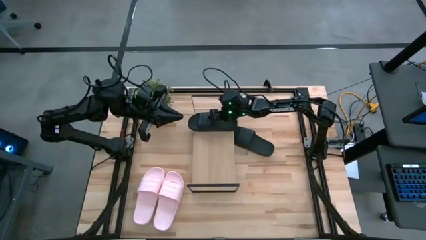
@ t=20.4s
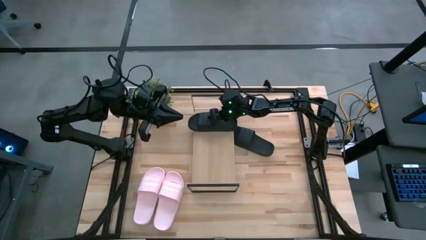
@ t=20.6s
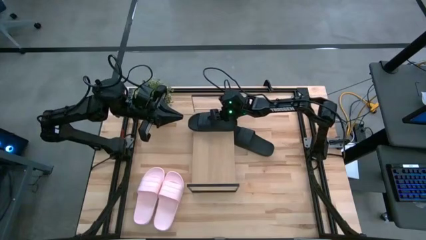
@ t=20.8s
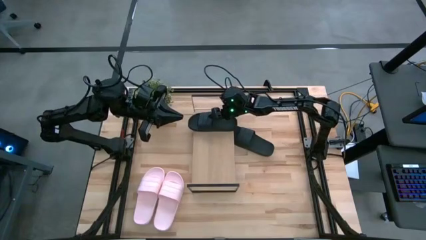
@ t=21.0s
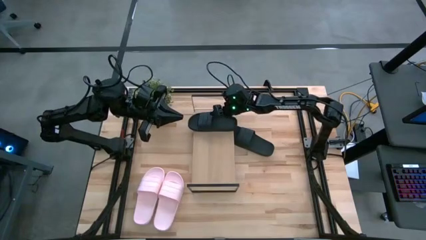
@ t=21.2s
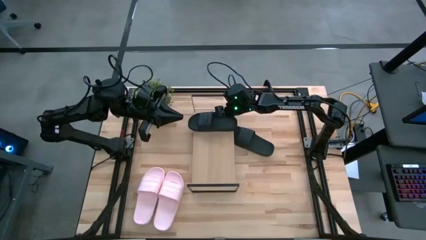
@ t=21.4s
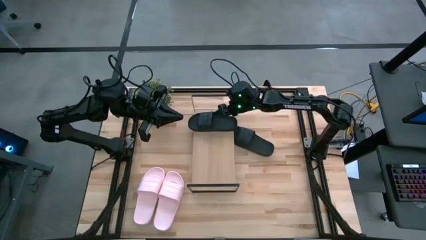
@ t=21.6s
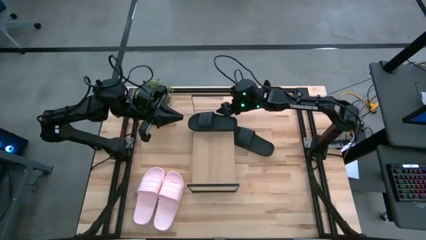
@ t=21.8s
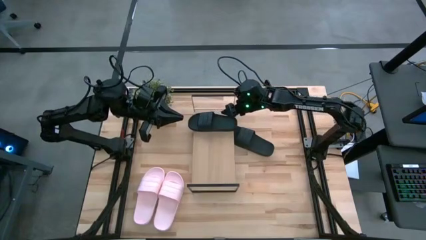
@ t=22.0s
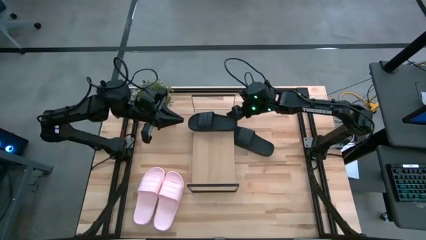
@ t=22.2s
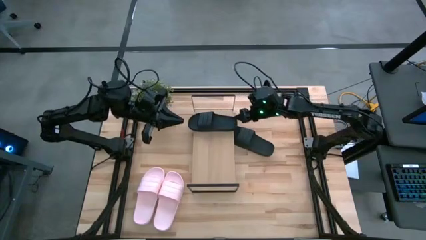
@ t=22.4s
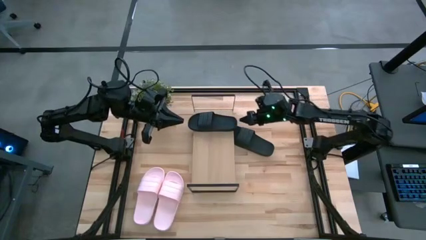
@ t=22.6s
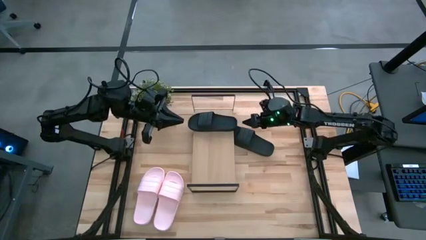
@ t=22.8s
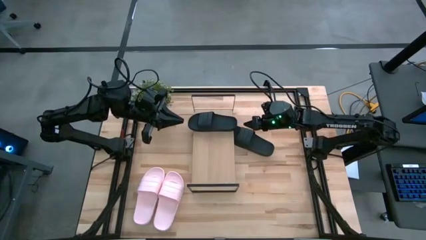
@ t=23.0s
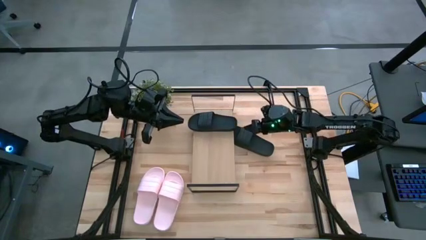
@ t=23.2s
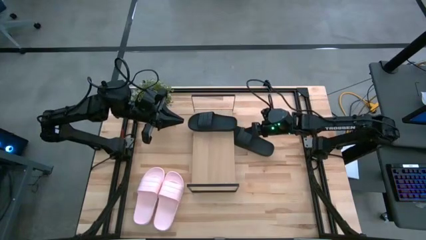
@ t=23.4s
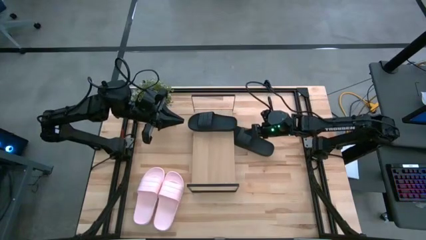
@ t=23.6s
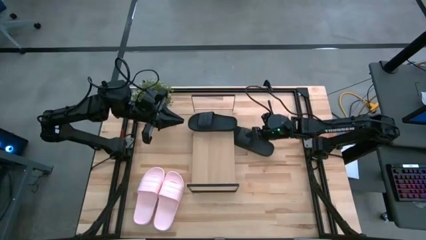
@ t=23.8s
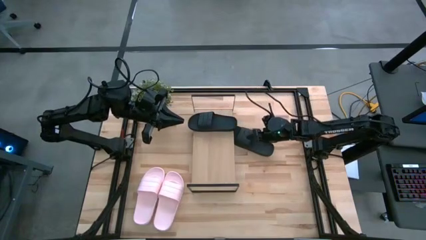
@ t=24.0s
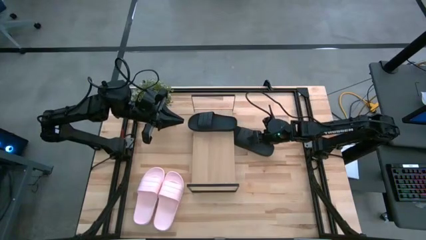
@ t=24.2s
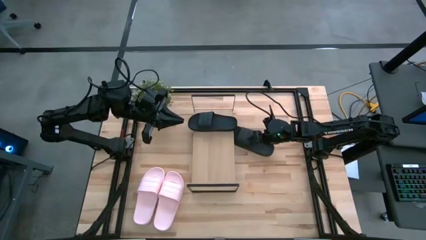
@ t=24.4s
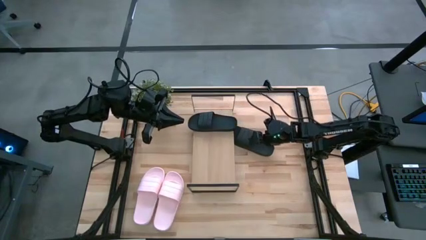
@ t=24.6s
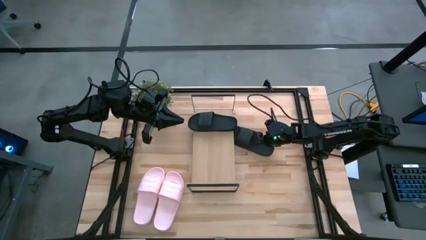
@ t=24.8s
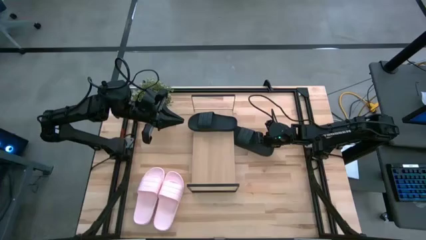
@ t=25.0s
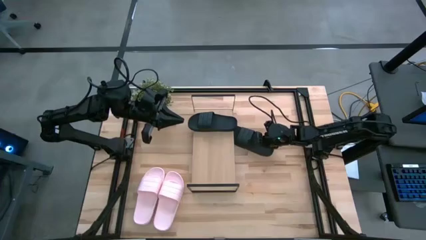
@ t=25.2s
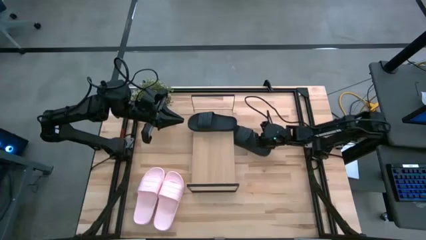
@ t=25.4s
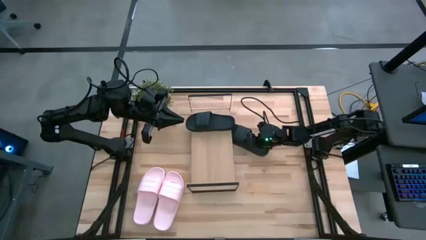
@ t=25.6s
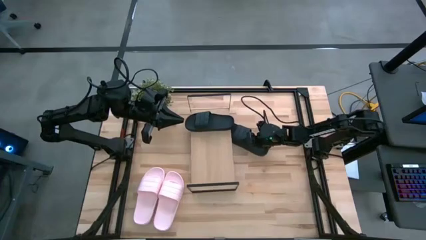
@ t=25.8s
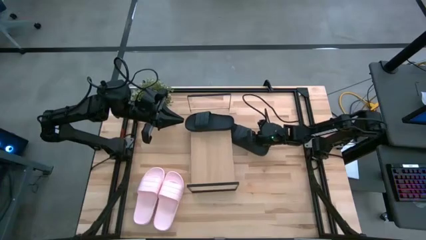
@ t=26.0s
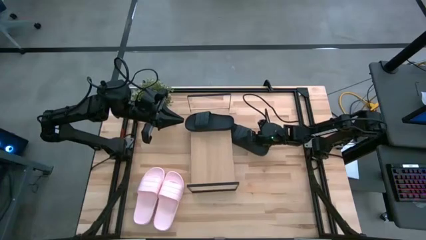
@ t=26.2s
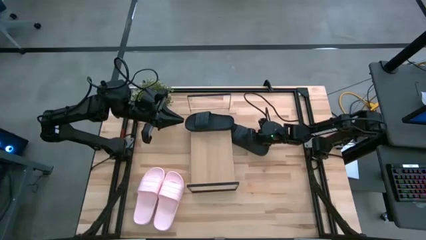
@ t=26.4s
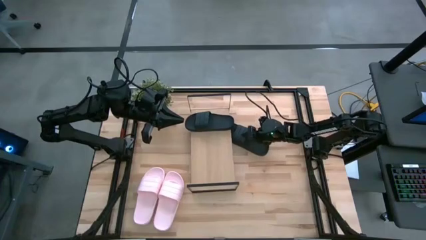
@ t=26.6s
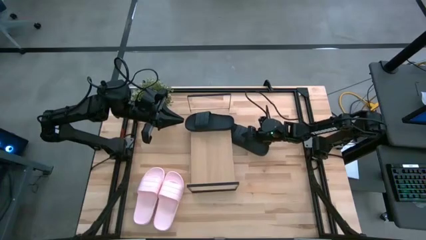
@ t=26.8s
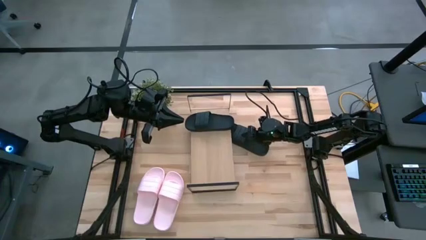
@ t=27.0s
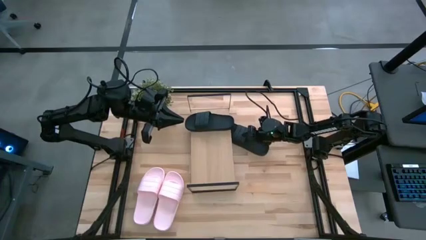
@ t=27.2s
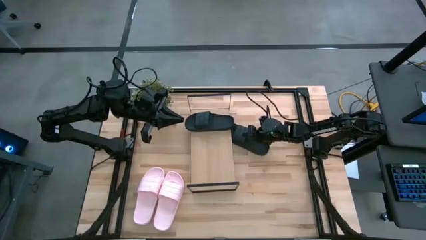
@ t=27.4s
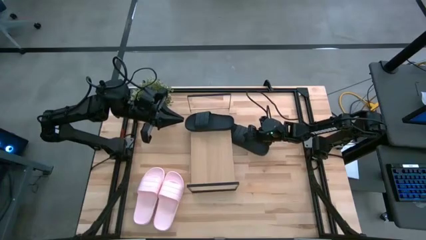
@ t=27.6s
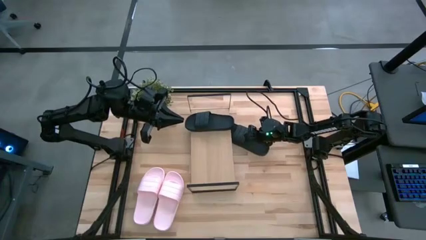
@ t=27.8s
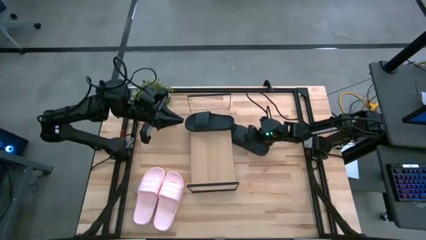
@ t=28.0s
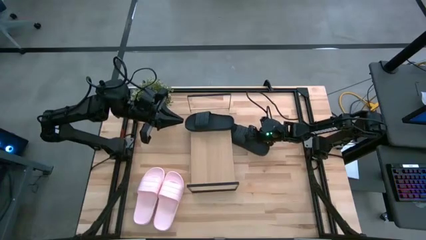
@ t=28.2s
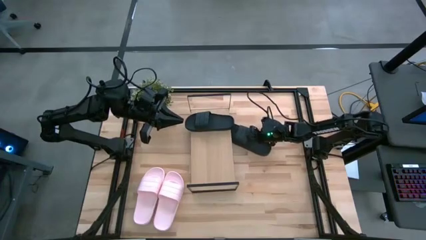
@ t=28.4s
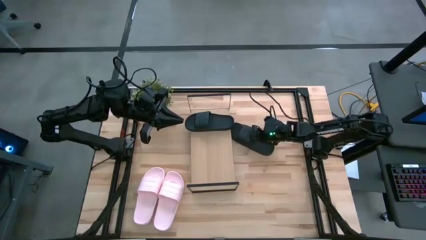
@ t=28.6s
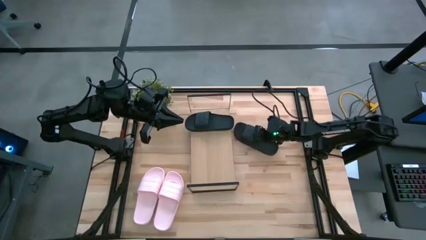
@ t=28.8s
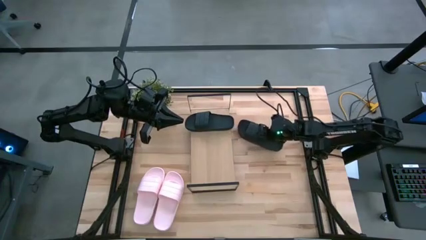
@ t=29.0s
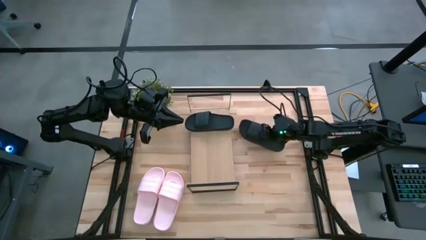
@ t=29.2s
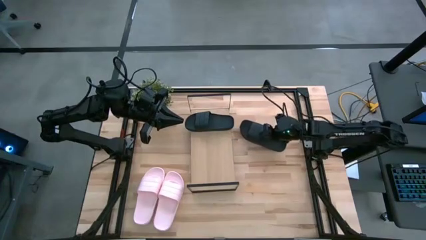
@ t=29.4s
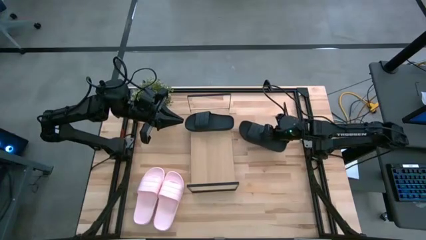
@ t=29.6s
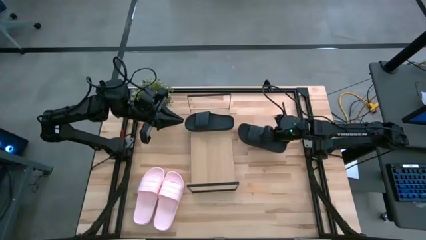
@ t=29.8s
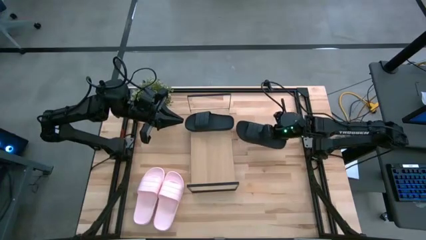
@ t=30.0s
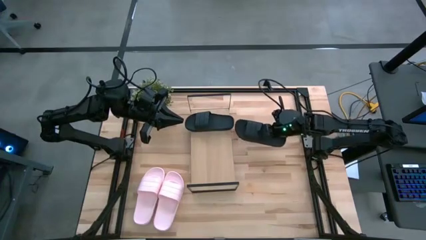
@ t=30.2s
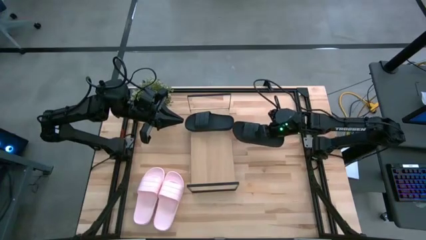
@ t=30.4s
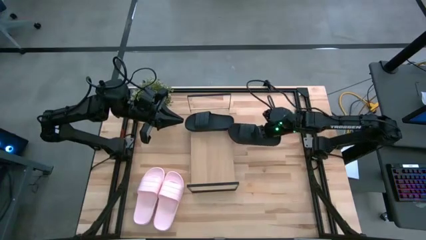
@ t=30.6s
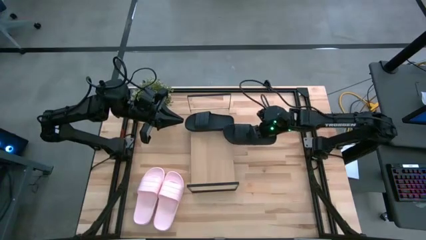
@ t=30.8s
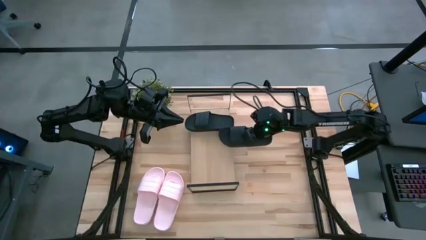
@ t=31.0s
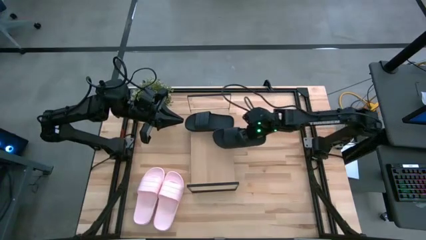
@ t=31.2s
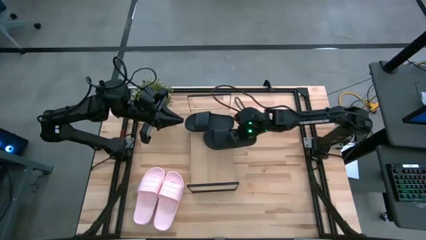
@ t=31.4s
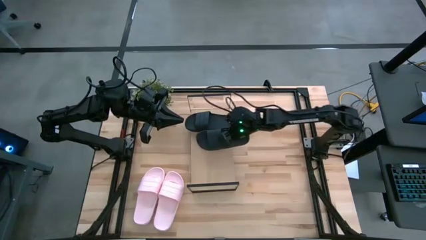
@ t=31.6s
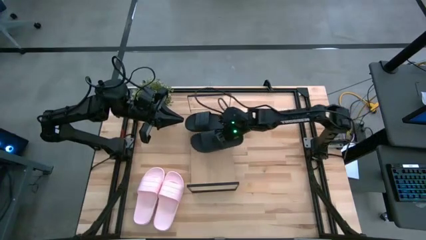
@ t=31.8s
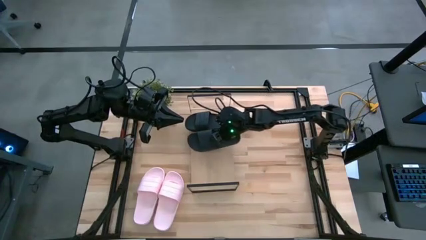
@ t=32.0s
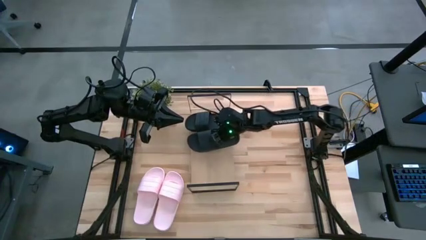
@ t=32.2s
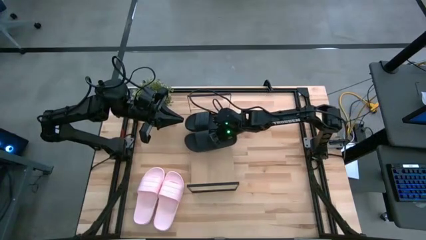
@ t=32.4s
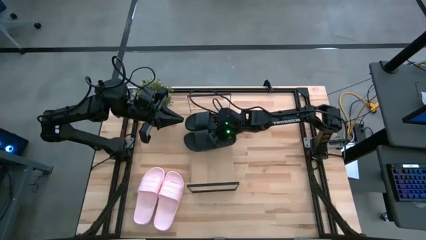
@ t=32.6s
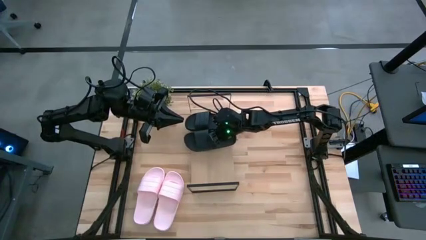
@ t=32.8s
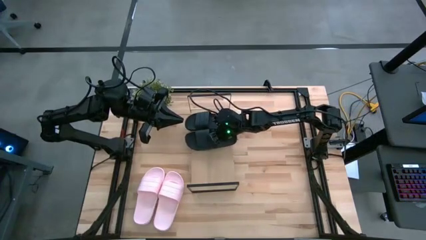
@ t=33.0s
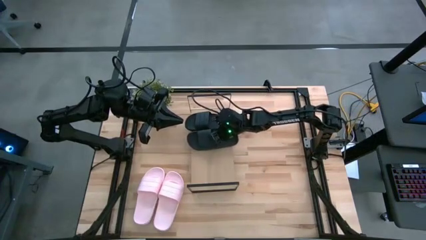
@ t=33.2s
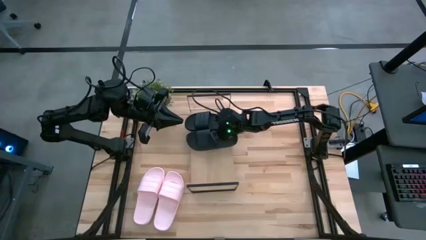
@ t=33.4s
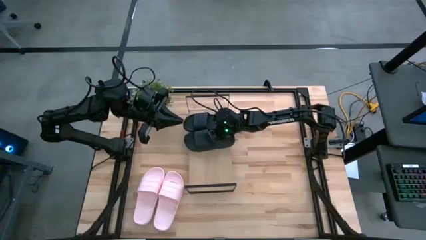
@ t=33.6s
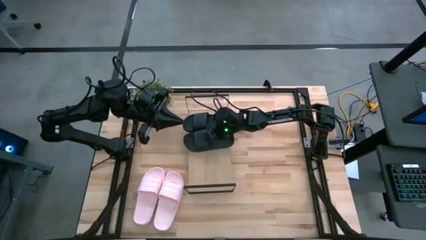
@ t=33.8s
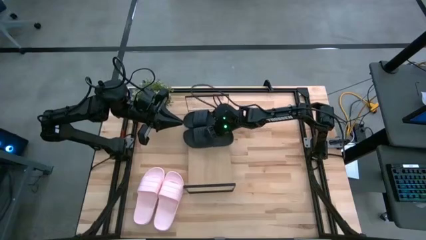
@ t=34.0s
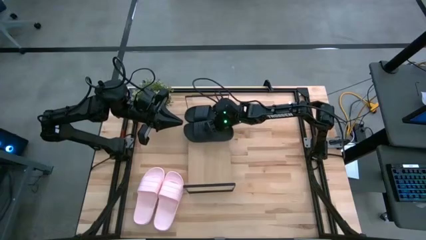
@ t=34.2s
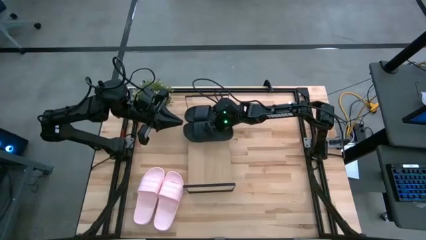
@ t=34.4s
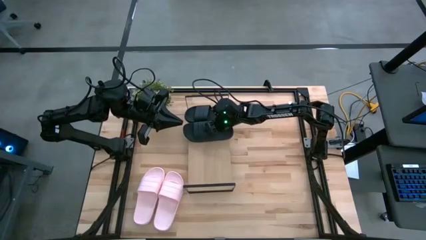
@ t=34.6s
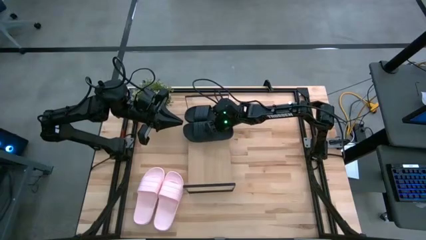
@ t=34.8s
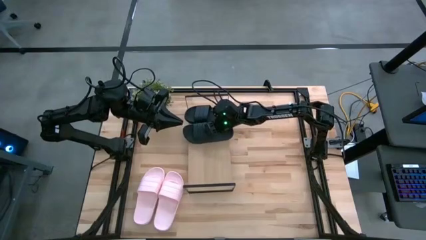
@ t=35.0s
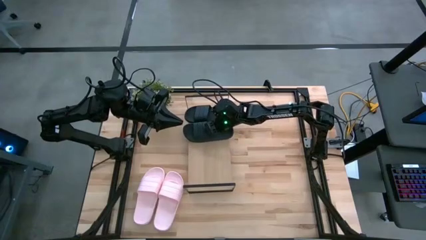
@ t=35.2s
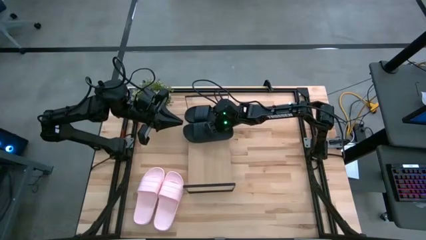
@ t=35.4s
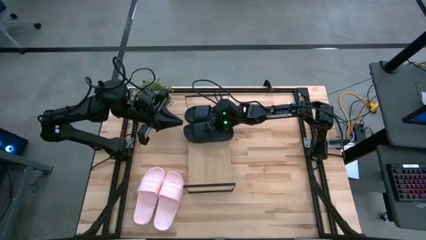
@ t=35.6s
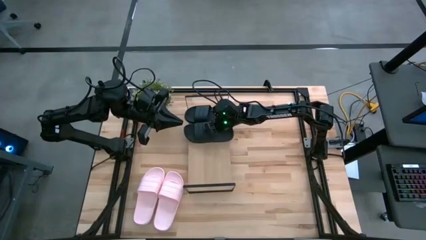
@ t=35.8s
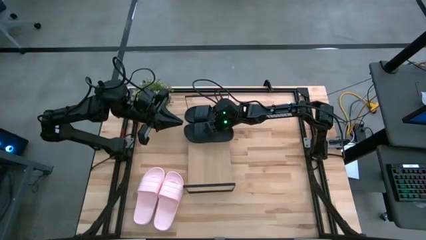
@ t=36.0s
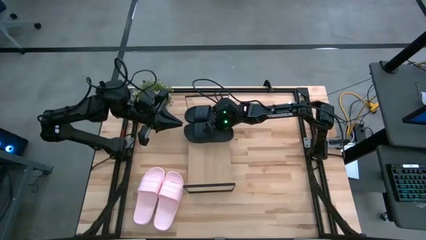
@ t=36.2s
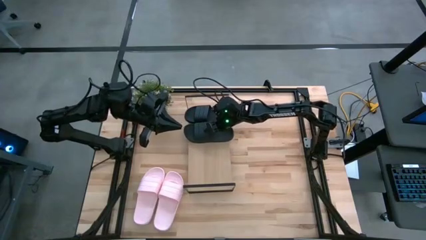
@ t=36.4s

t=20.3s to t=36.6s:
Task: Pick and place slides into the shelf
Put the black slide on the shelf
